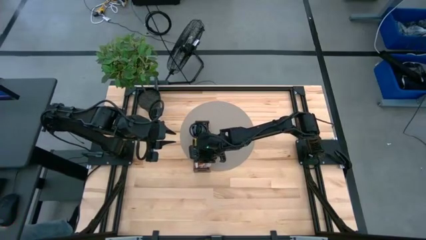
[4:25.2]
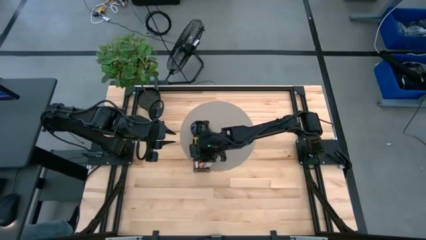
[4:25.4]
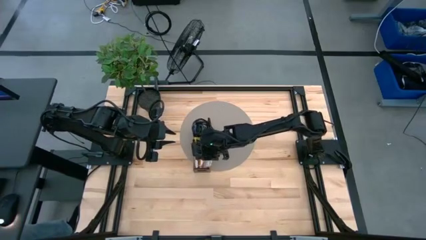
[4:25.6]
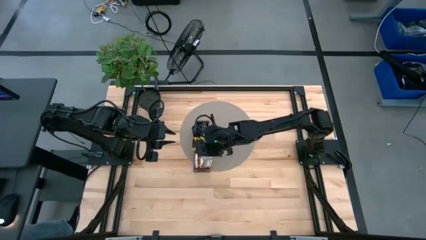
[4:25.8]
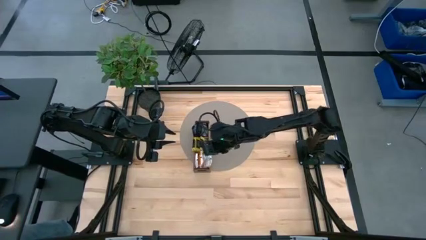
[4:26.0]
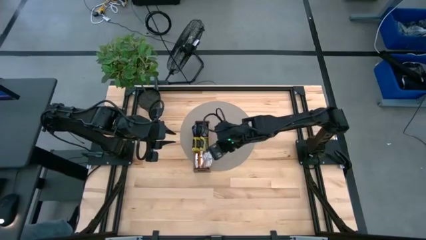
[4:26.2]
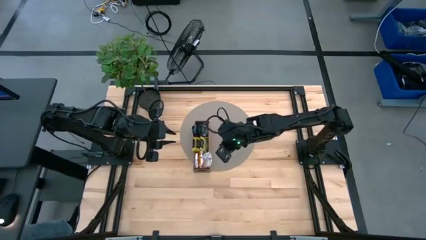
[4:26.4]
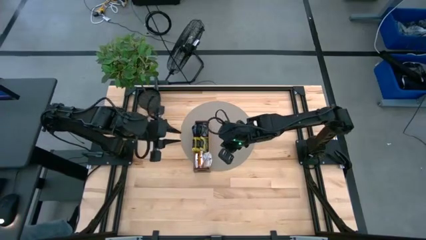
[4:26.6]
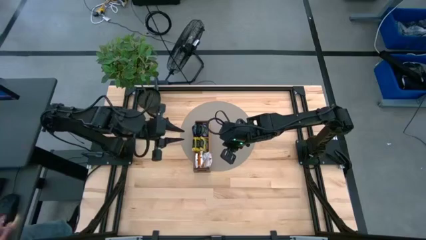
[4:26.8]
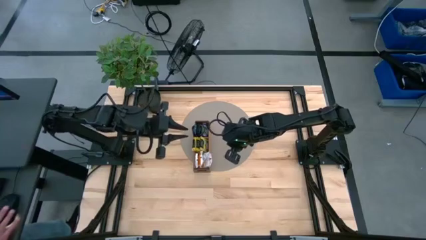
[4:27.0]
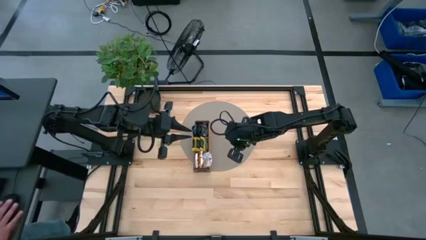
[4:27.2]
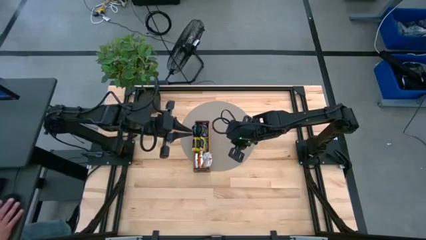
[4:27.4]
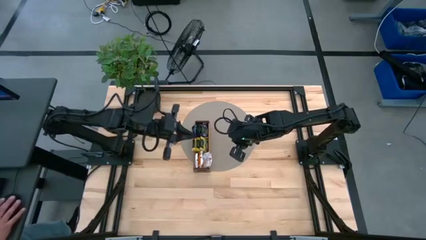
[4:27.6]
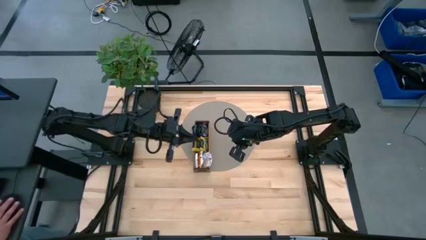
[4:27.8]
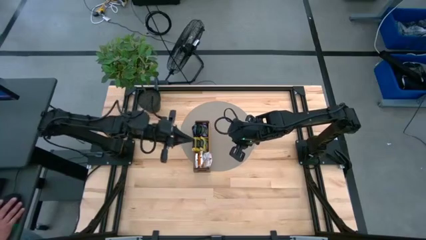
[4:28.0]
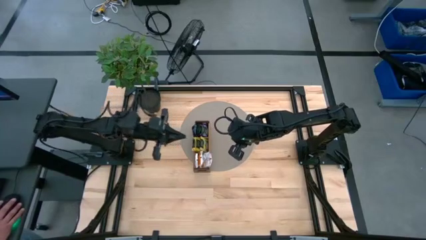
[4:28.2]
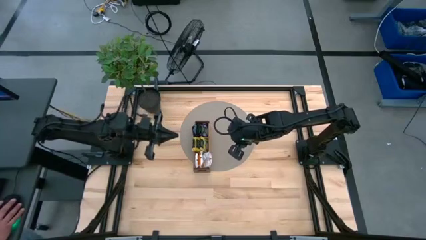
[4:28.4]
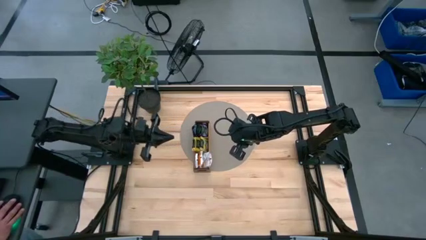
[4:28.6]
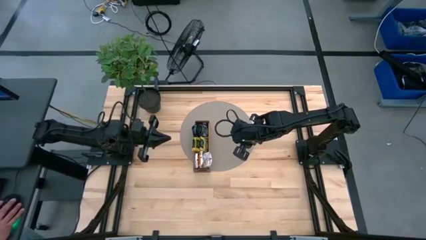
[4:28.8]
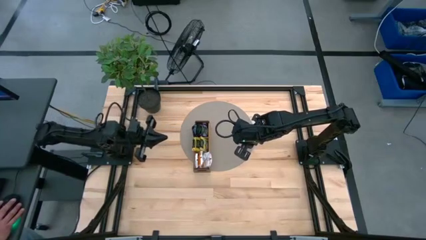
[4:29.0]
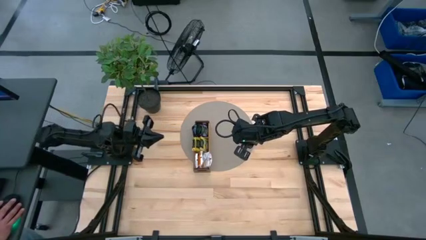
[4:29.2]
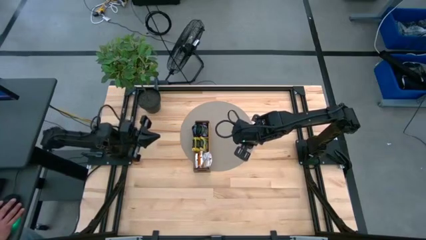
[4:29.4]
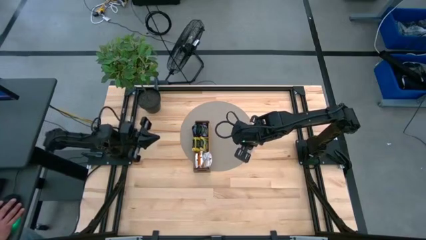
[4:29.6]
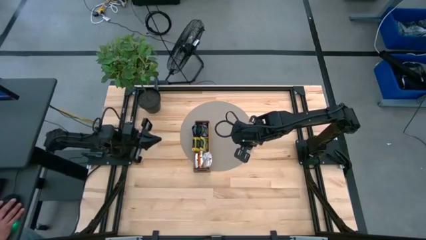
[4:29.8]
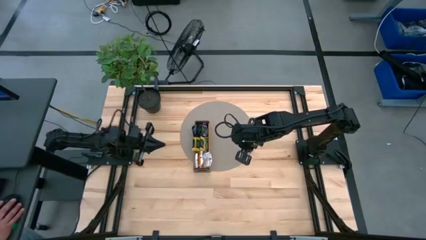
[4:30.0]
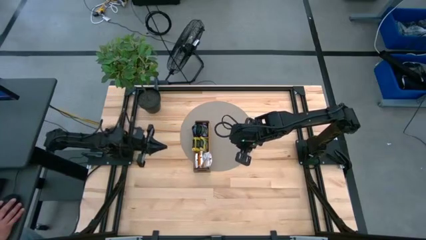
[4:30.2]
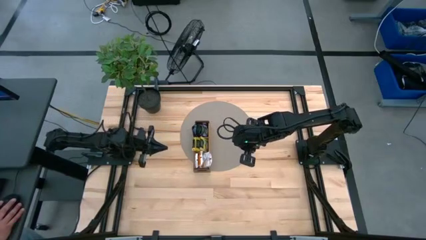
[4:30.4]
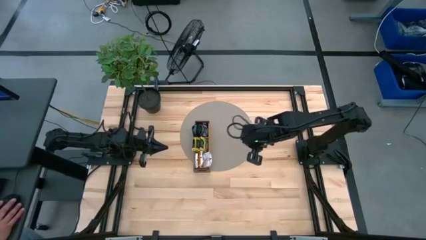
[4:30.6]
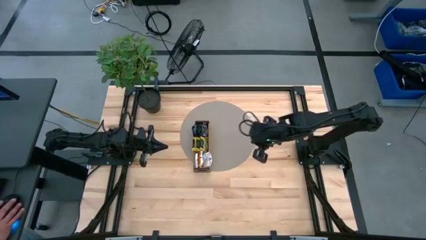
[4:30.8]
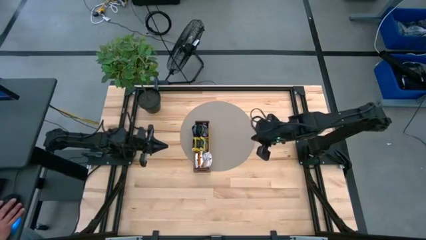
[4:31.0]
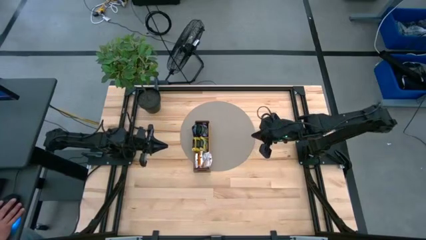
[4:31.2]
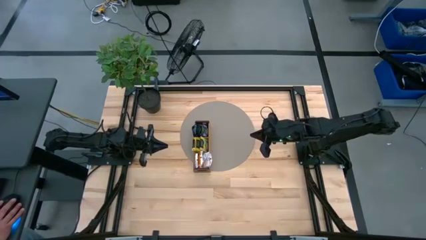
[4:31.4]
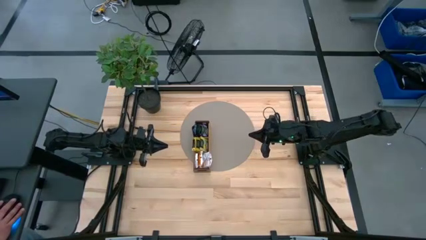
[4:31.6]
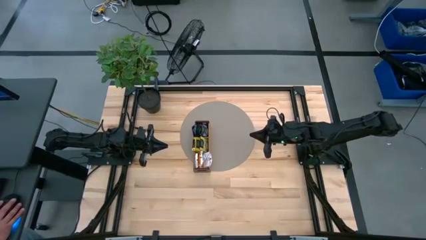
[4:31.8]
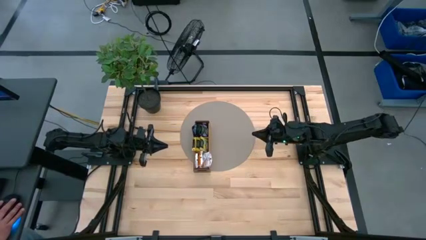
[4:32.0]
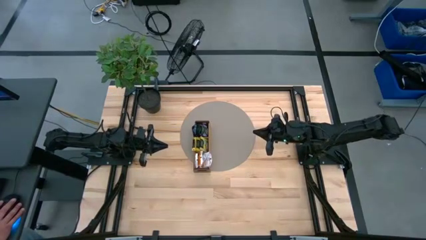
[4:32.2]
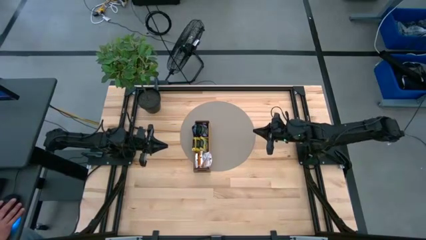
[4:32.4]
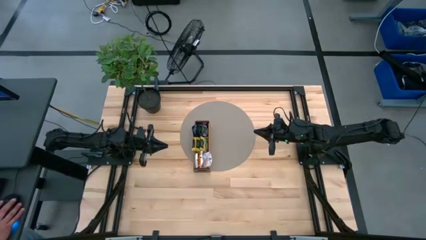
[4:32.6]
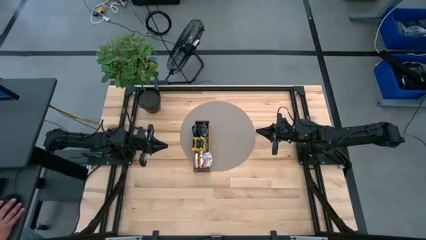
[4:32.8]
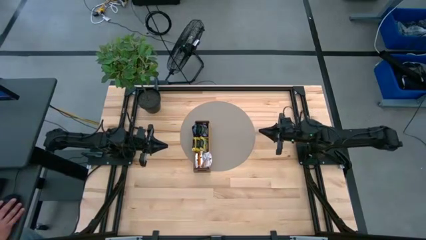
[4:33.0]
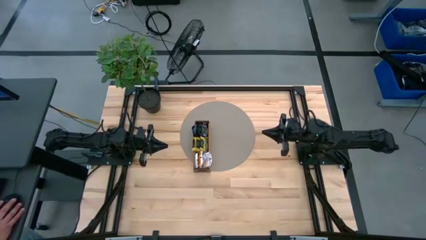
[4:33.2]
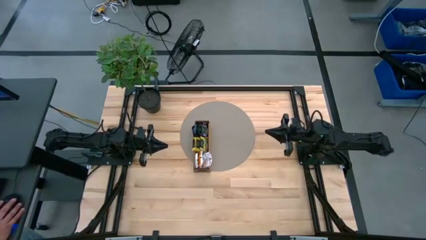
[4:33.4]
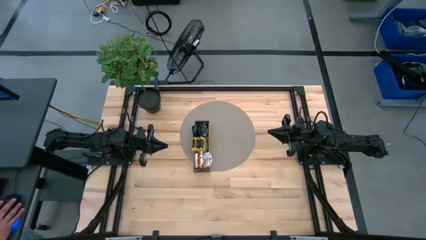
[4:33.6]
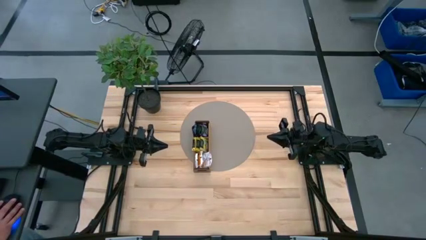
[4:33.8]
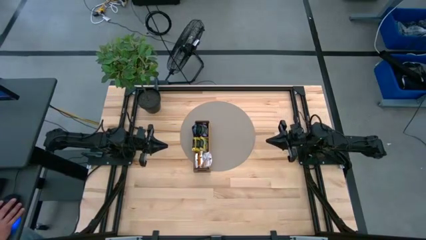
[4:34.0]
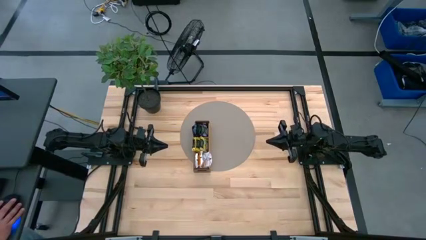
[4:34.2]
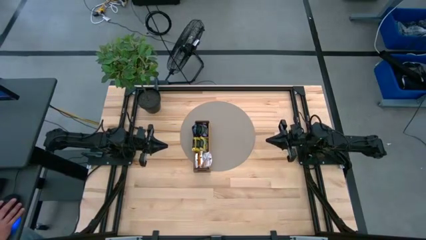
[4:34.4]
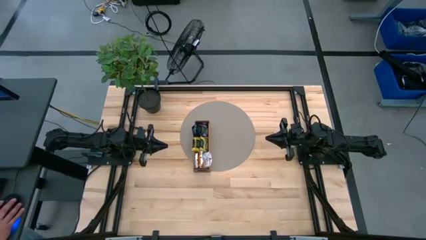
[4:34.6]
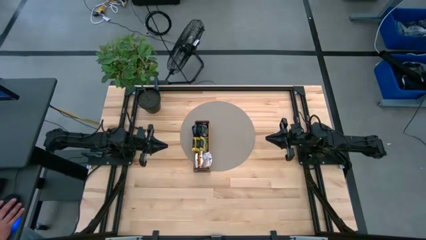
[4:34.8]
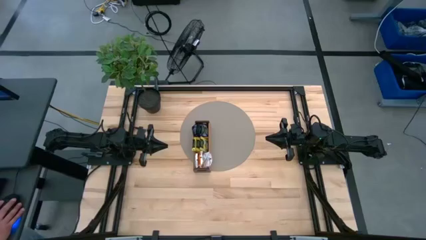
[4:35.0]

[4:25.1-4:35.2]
Task: Pick & Place Tea
Return to Home Position
